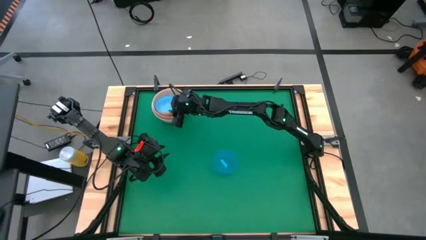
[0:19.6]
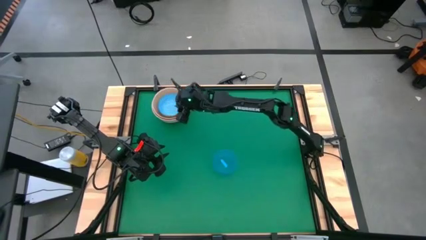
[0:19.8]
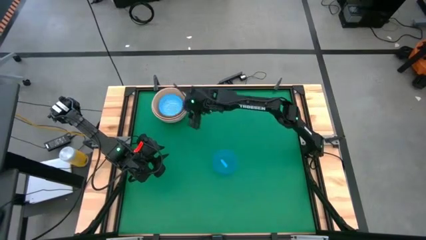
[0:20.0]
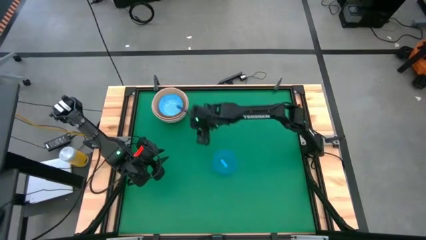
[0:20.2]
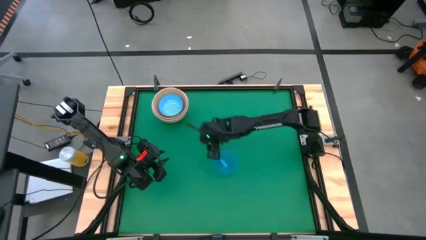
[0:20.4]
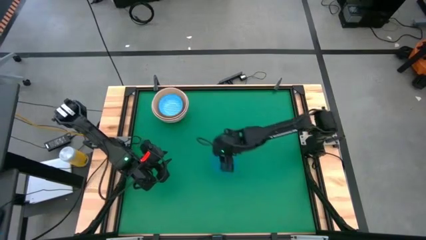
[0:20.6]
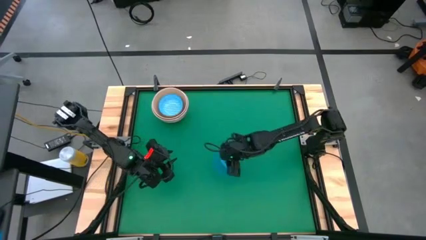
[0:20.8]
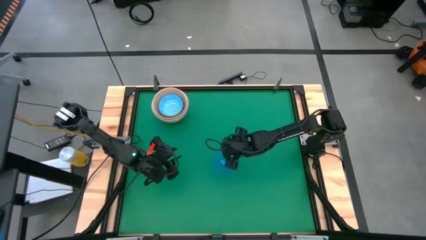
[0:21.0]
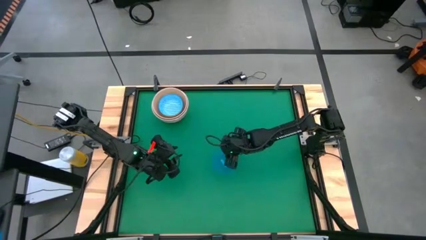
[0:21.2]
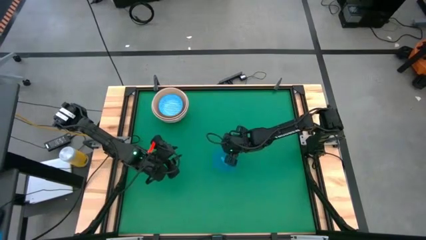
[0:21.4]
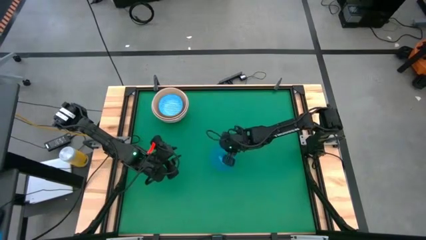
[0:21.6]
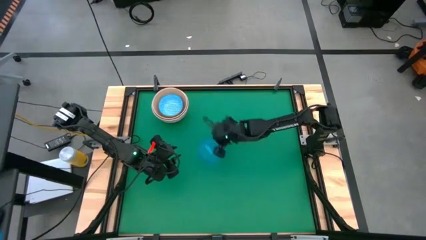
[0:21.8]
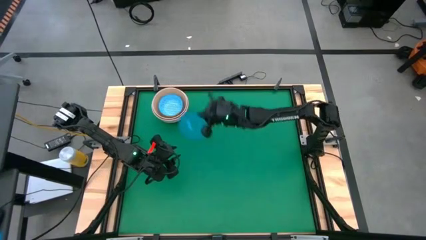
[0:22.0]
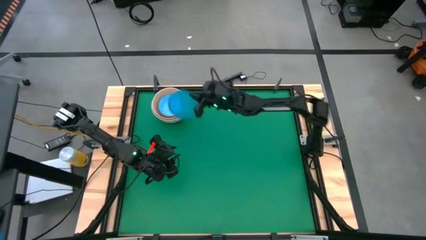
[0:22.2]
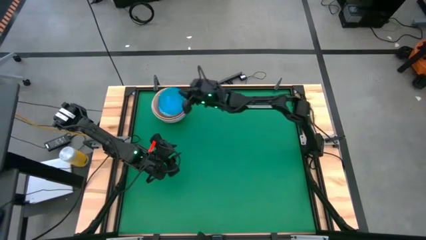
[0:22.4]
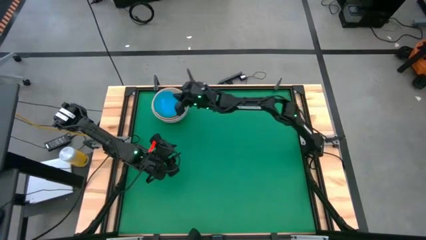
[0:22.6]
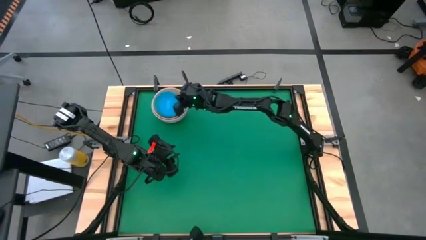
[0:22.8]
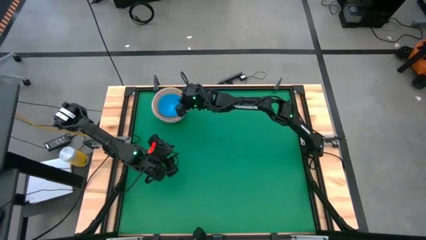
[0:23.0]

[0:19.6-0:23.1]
Stack the blue transparent bowl on top of the blue patterned bowl

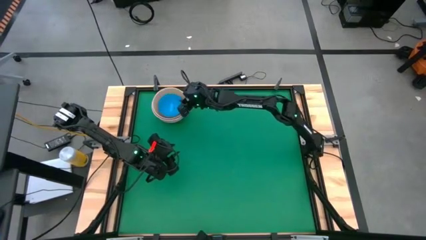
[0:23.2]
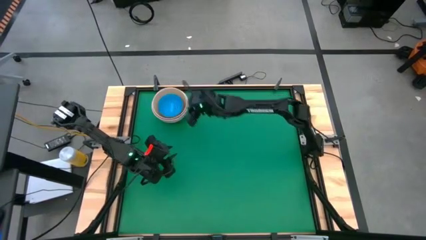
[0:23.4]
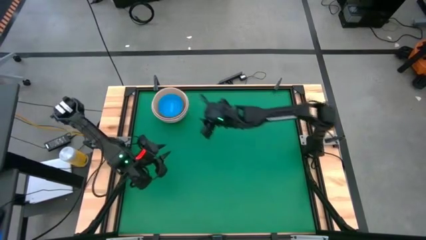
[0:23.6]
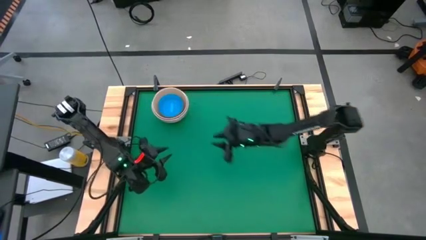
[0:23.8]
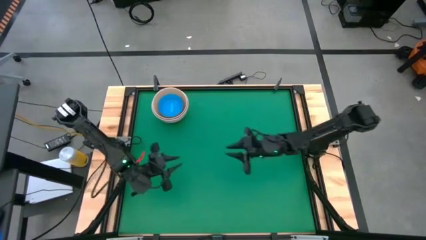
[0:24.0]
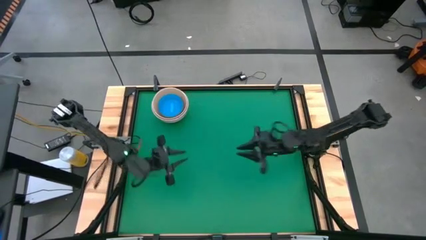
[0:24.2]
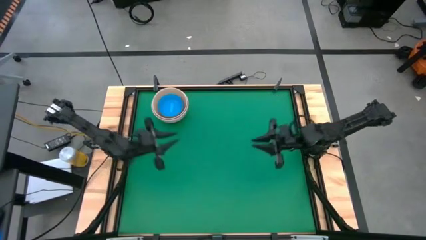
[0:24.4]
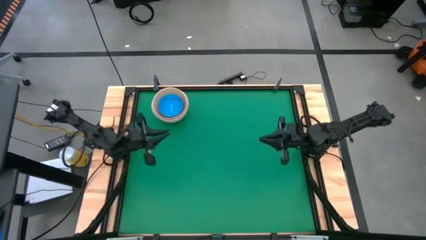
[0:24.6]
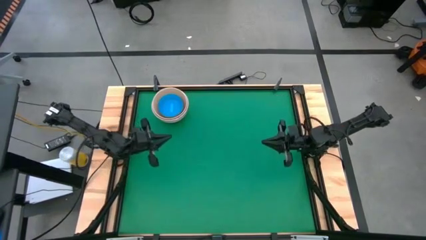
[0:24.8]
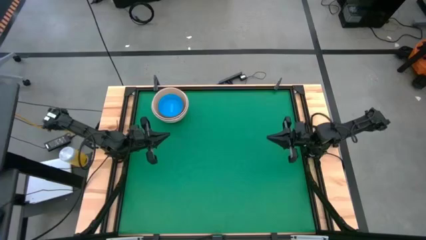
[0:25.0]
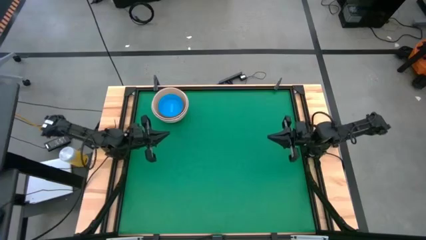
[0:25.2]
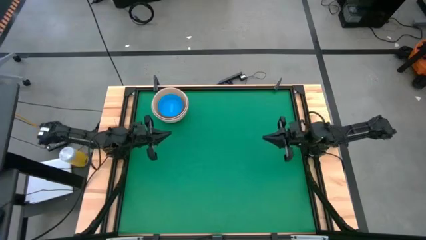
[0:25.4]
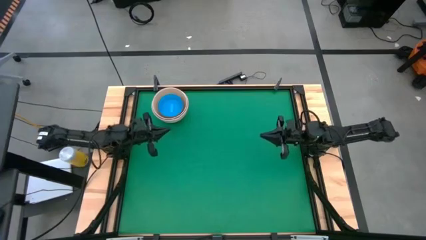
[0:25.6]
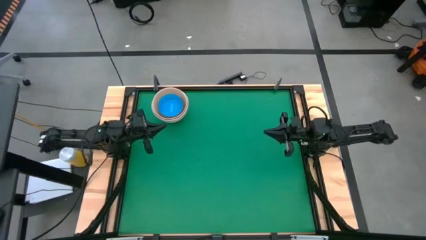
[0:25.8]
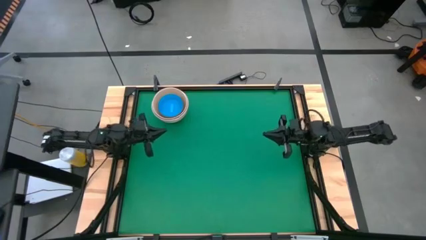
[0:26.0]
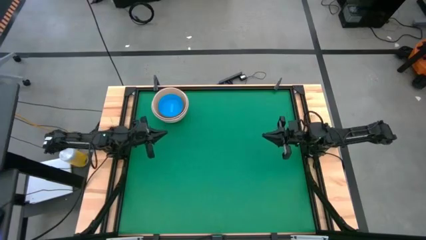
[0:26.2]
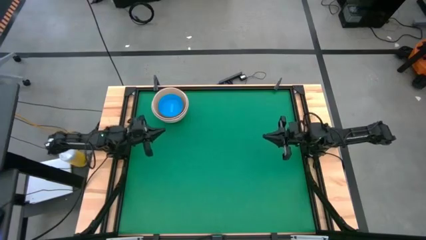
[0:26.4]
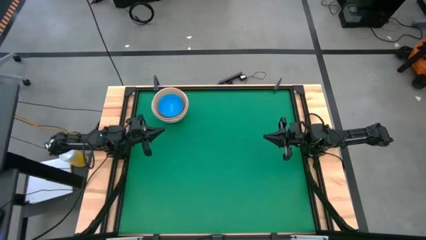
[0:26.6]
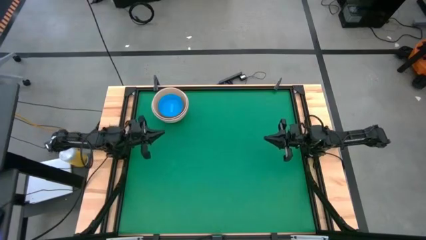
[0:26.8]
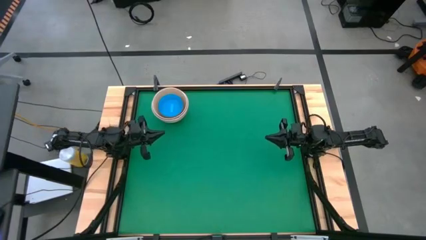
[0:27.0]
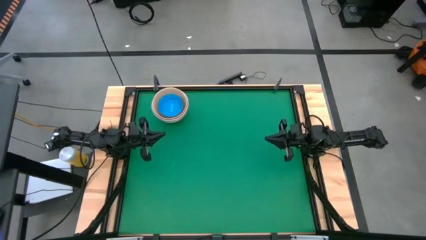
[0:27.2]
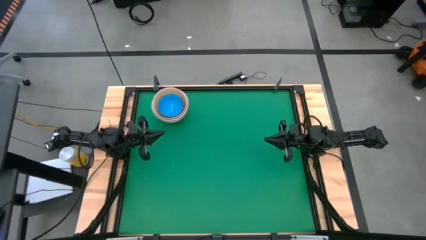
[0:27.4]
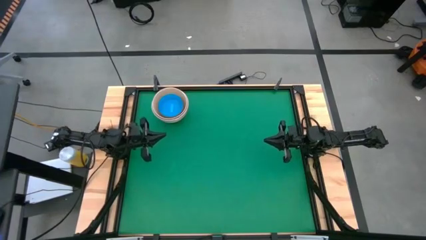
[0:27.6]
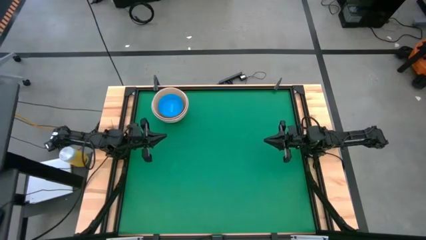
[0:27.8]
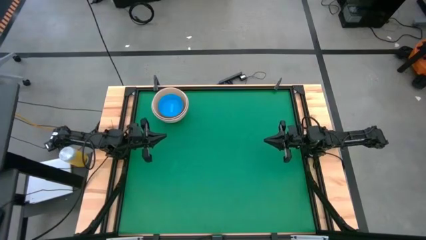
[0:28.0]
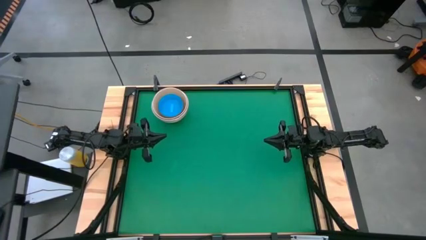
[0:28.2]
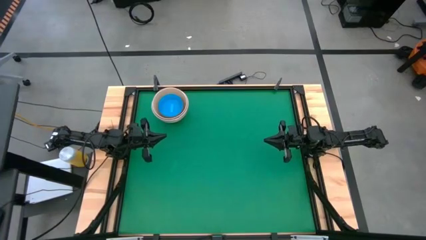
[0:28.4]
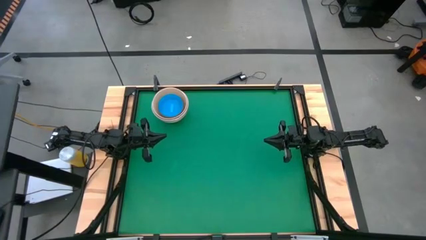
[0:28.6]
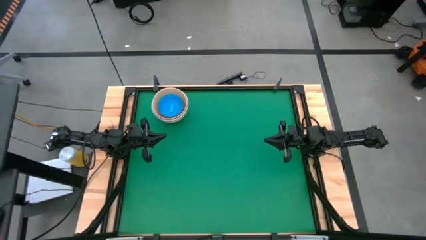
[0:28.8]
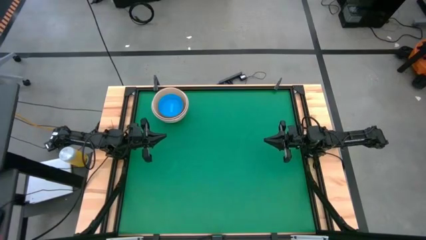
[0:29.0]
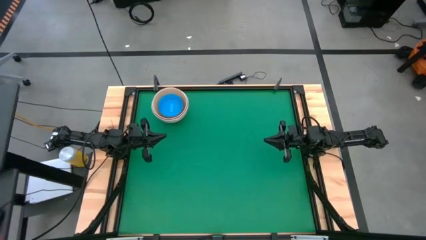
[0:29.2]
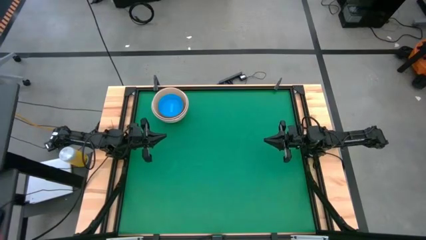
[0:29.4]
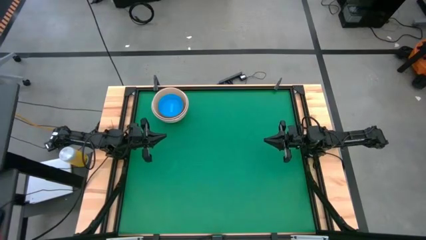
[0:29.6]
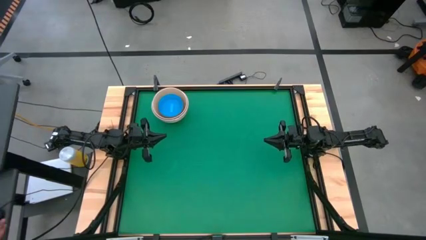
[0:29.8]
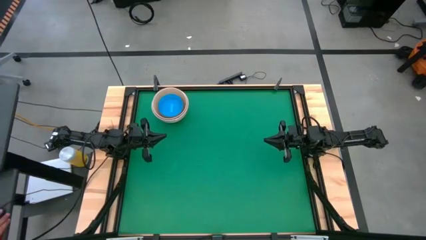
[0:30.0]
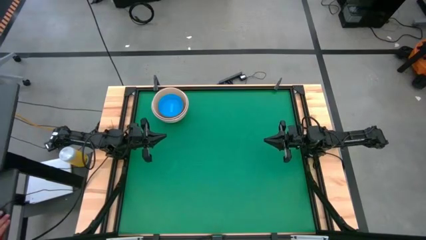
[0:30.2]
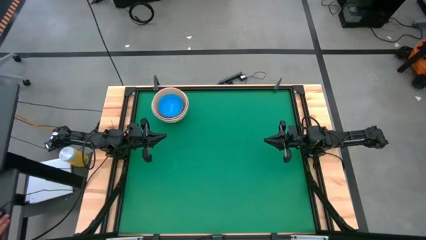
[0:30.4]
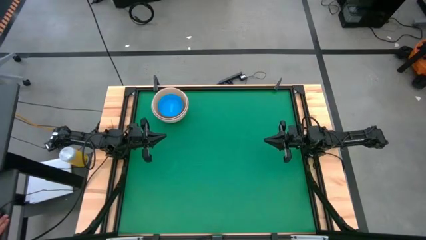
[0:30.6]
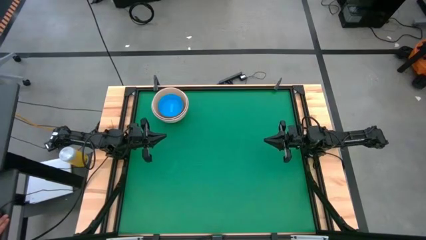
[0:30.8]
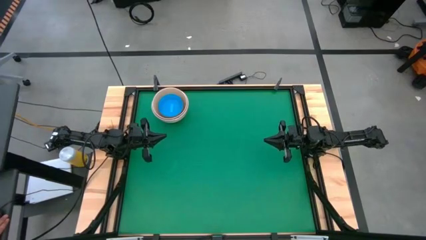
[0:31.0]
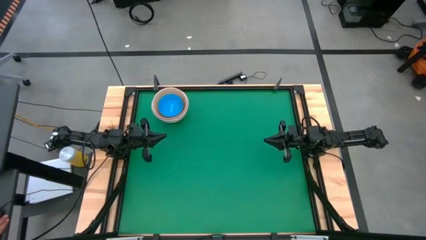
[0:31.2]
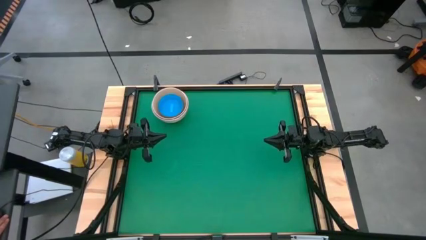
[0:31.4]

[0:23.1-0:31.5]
Return to Home Position

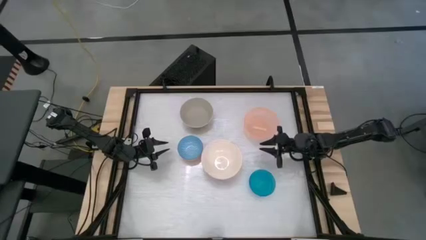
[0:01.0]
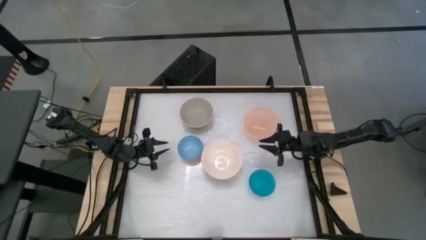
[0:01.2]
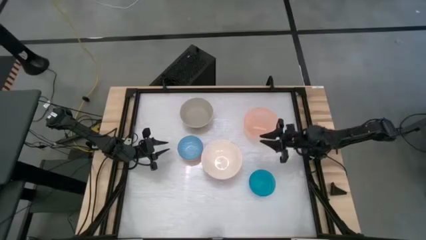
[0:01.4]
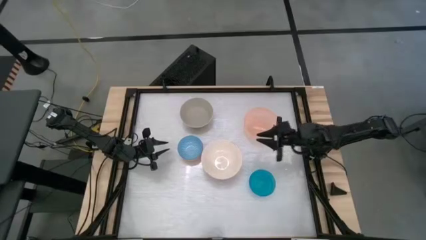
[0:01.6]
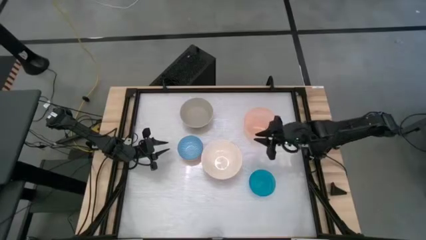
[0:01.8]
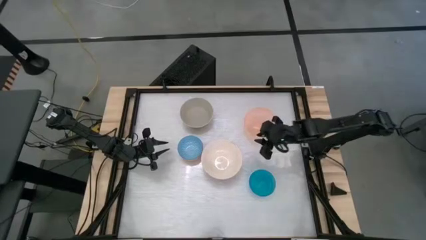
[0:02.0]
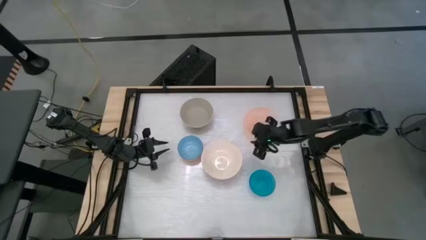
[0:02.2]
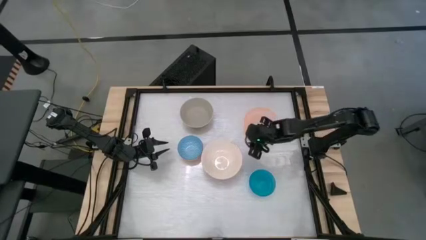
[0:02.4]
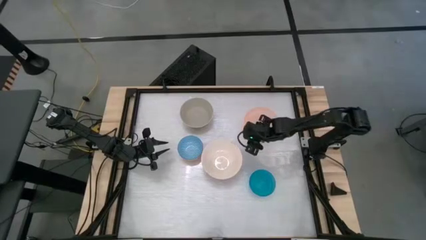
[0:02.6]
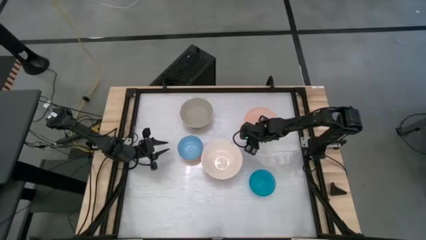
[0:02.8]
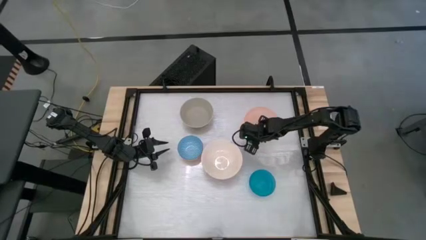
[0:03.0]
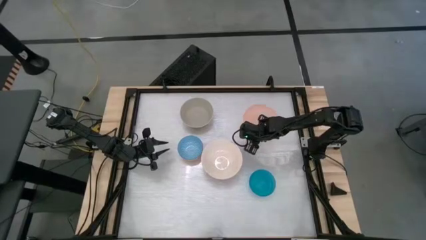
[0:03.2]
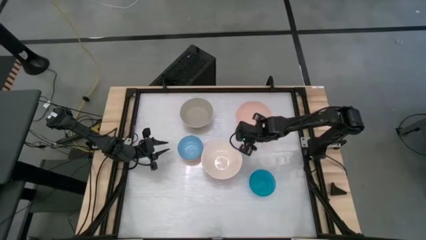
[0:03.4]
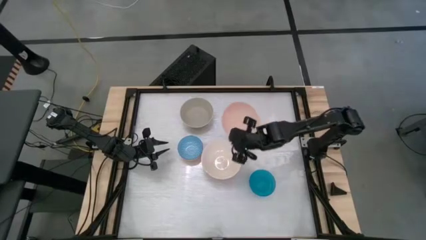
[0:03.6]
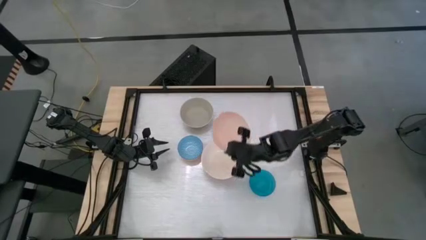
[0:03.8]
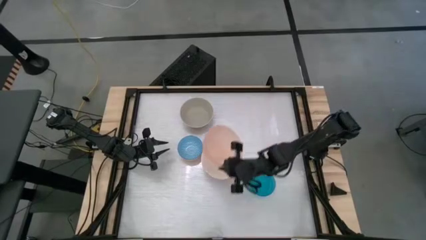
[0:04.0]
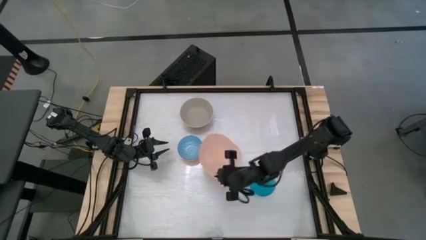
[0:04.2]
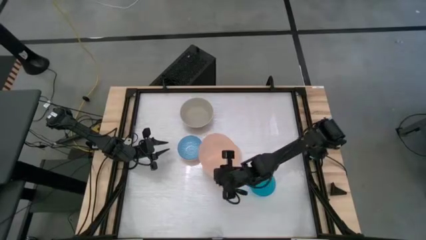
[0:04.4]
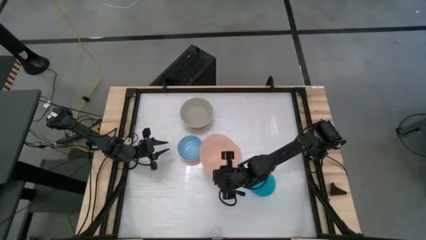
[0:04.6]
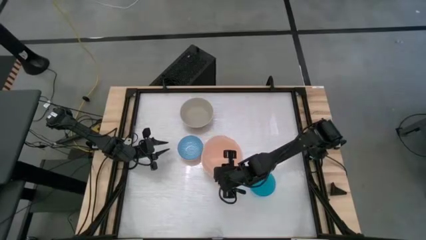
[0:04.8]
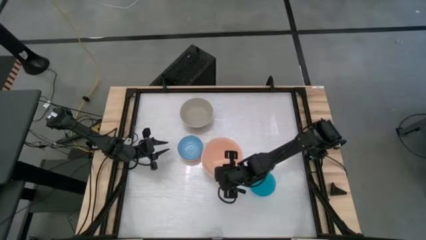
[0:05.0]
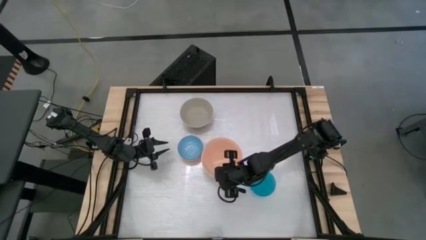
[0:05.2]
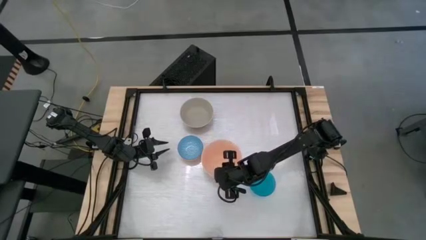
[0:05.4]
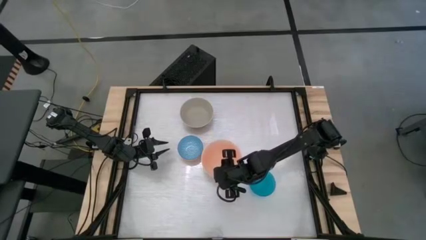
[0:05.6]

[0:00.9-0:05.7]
Stack the orange bowl on the pink bowl
